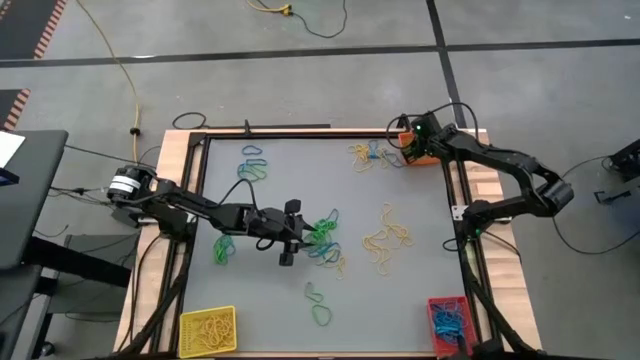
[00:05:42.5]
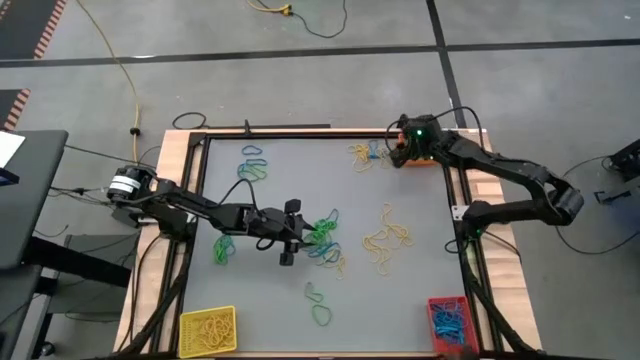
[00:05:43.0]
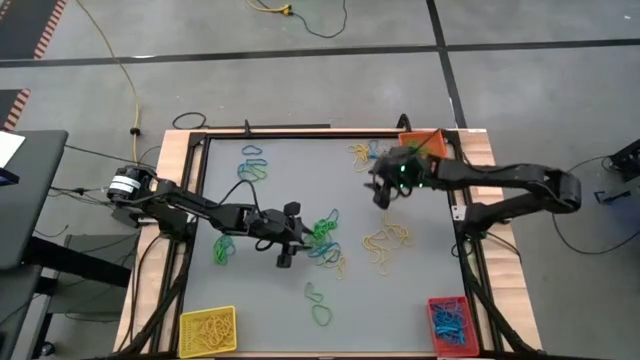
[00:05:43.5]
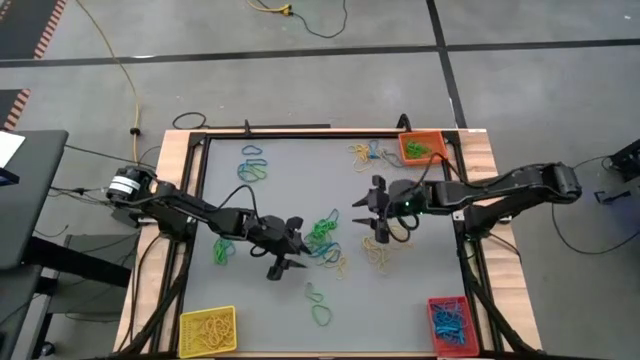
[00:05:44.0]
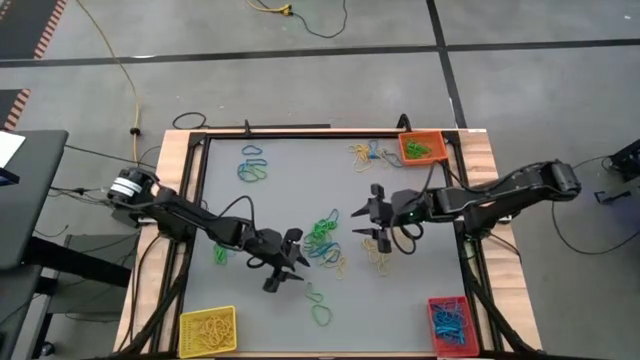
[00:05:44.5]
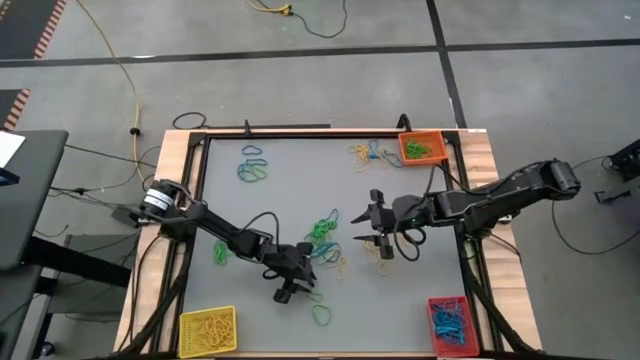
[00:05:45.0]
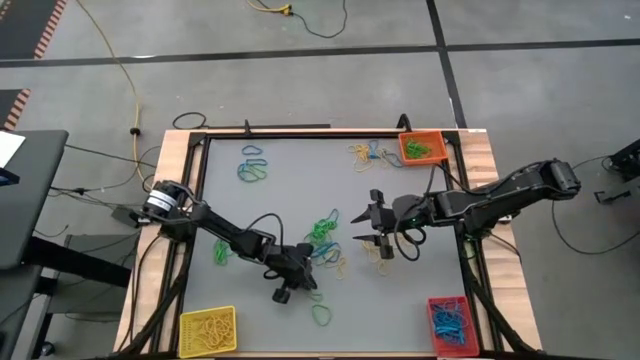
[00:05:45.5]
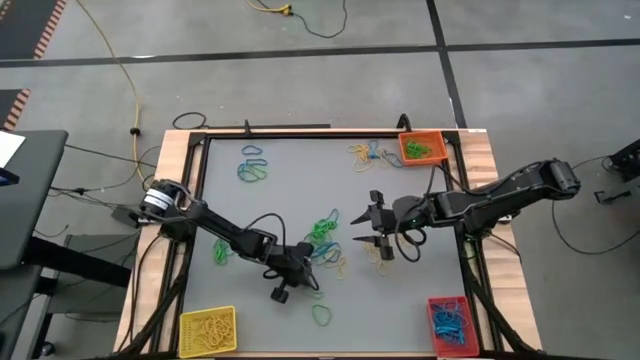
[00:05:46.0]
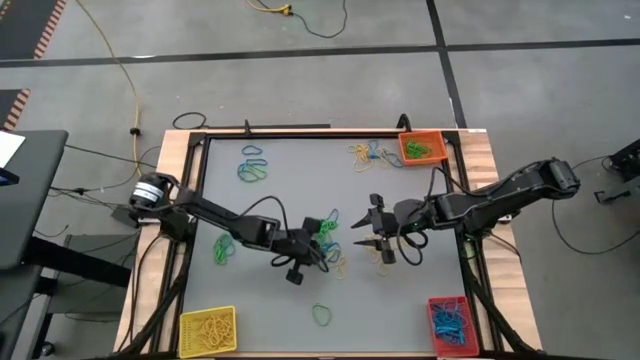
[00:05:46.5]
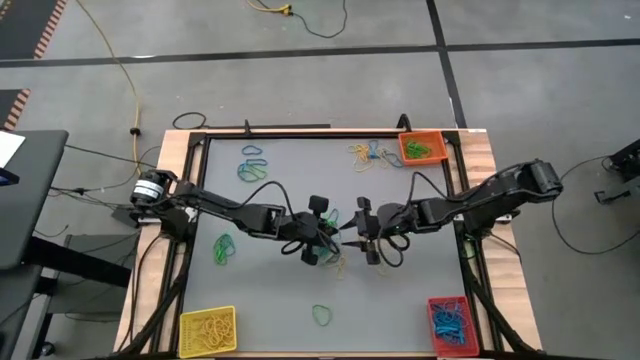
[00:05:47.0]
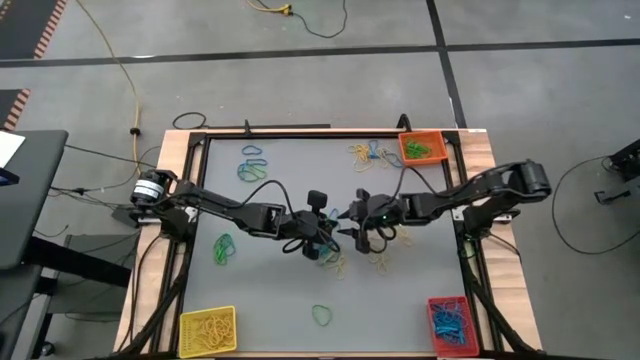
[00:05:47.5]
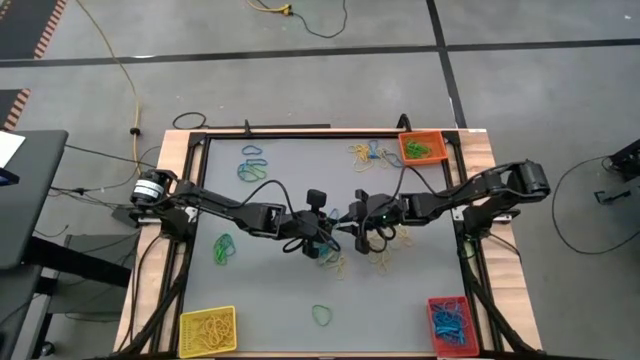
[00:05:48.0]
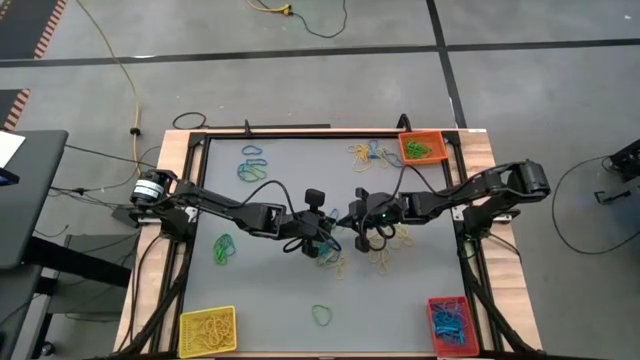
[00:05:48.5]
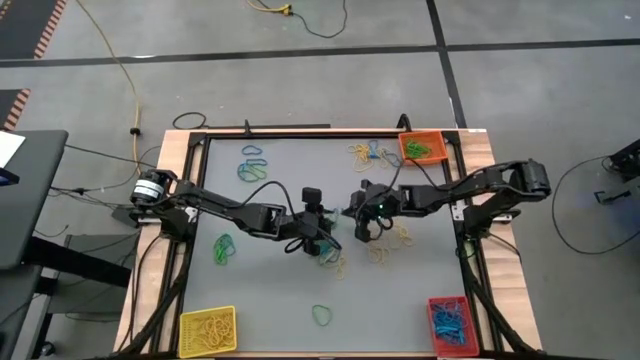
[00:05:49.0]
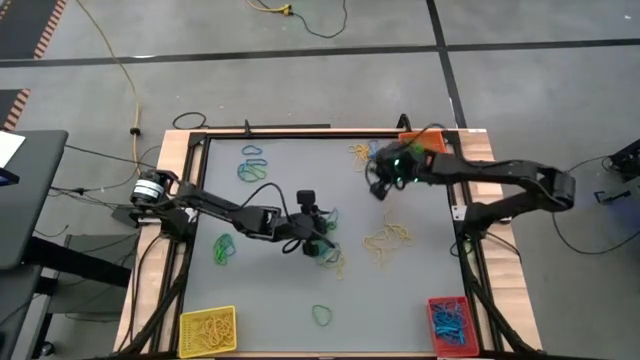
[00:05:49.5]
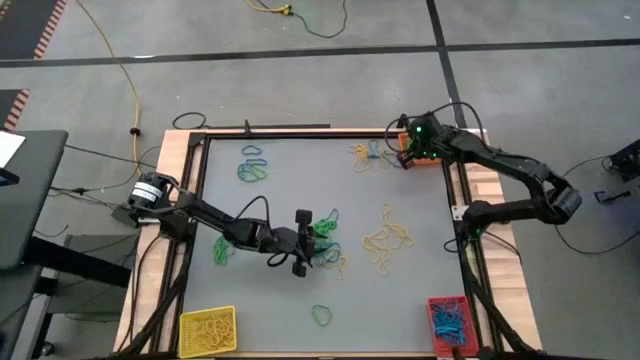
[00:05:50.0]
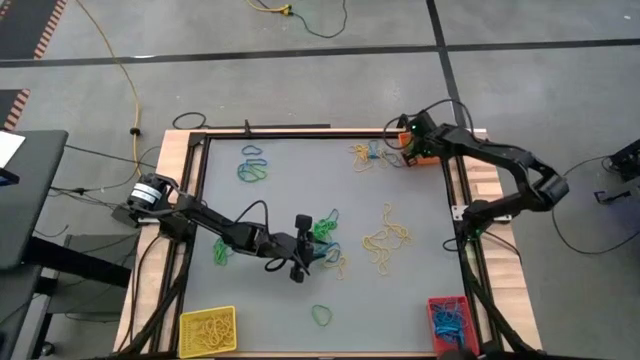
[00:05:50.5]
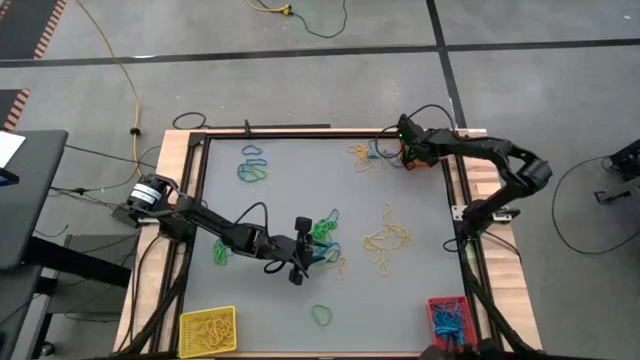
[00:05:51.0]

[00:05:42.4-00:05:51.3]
Task: Sort rubber bands into baskets
Put the green rubber band into the orange bin

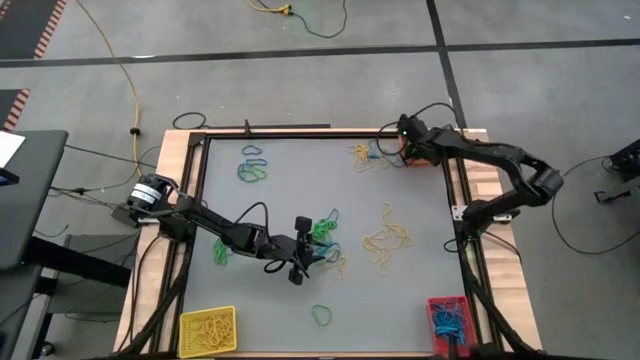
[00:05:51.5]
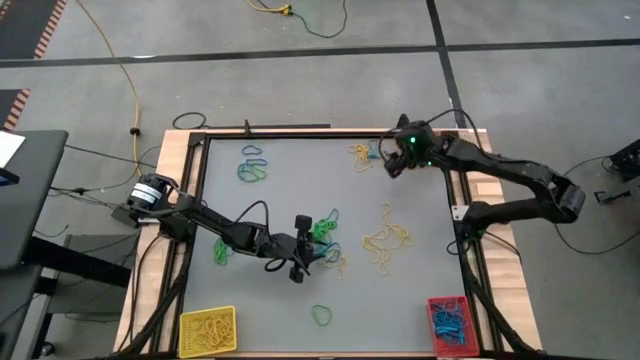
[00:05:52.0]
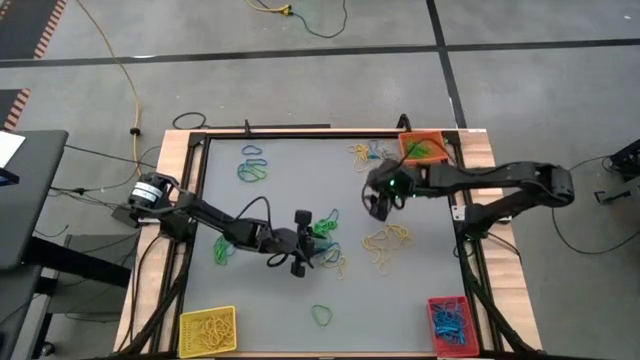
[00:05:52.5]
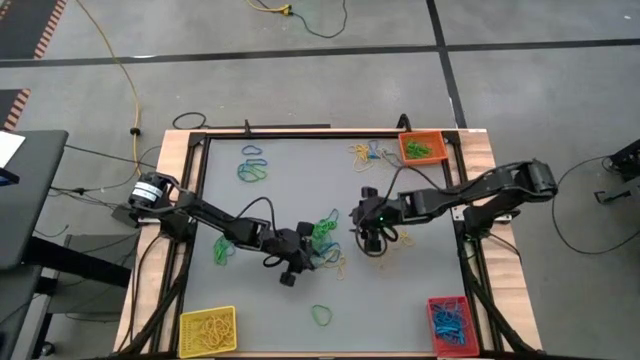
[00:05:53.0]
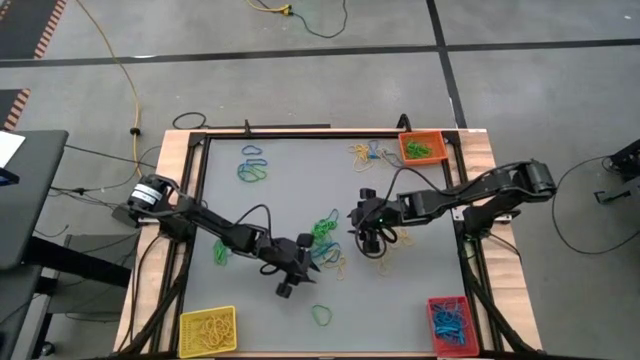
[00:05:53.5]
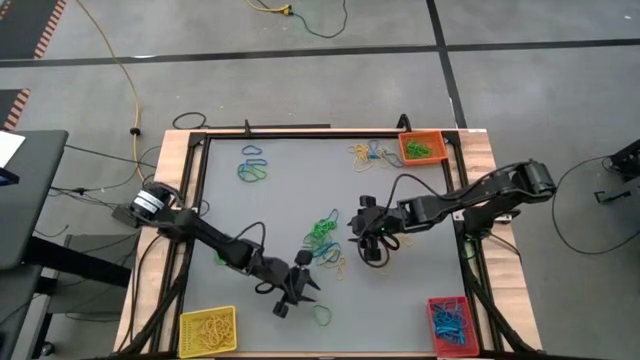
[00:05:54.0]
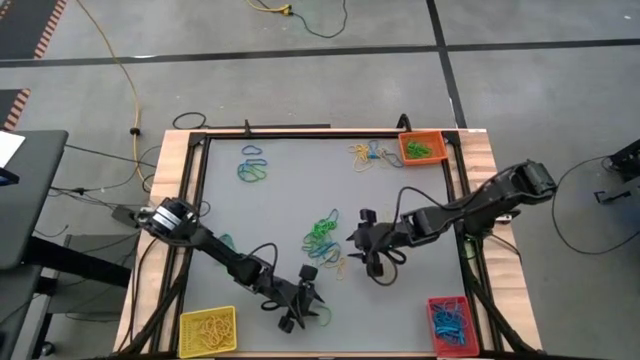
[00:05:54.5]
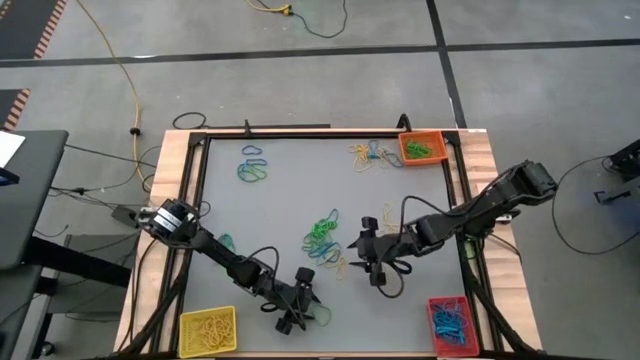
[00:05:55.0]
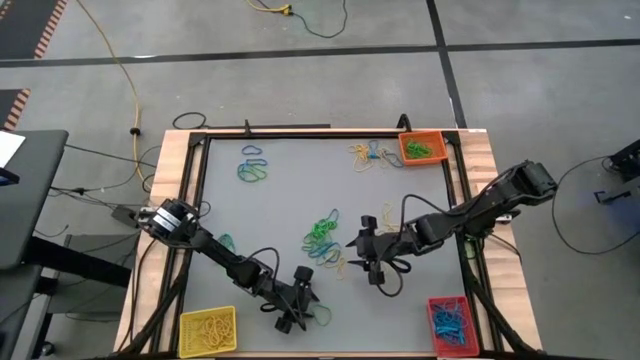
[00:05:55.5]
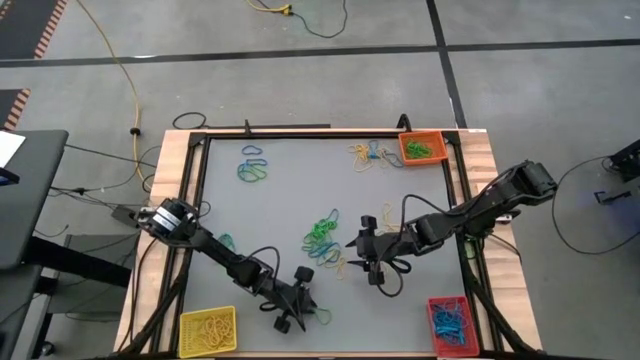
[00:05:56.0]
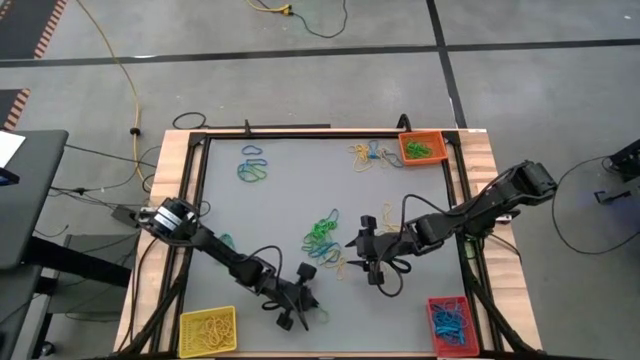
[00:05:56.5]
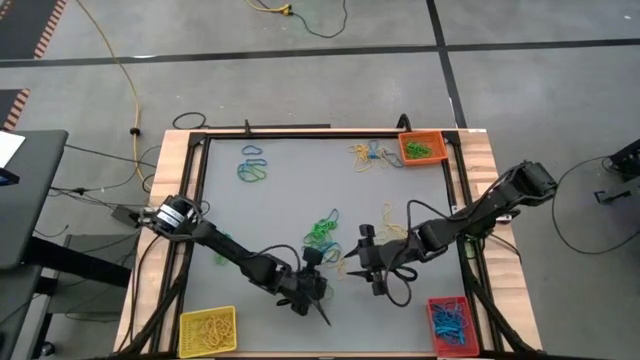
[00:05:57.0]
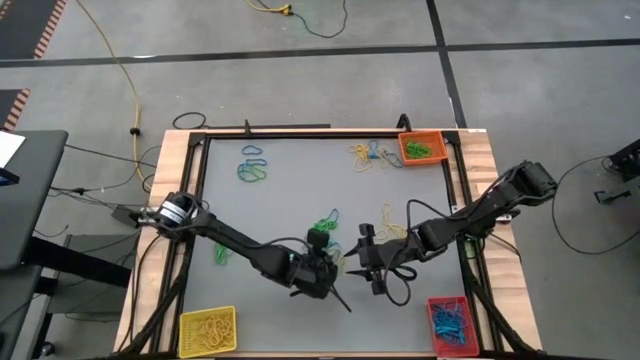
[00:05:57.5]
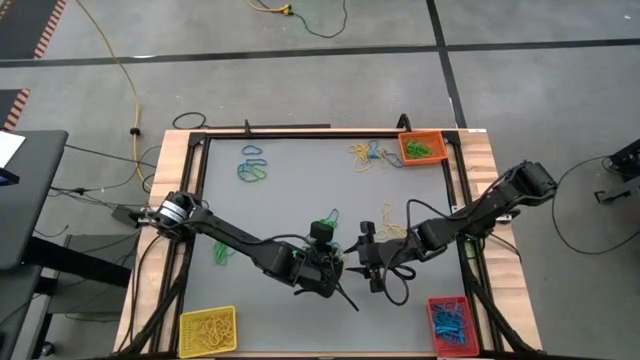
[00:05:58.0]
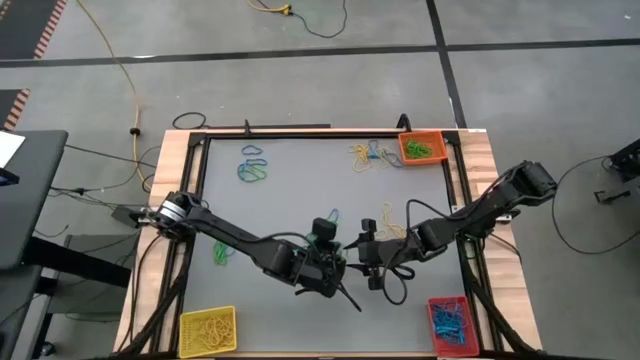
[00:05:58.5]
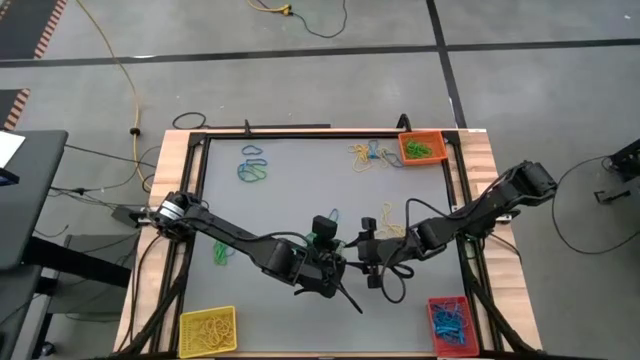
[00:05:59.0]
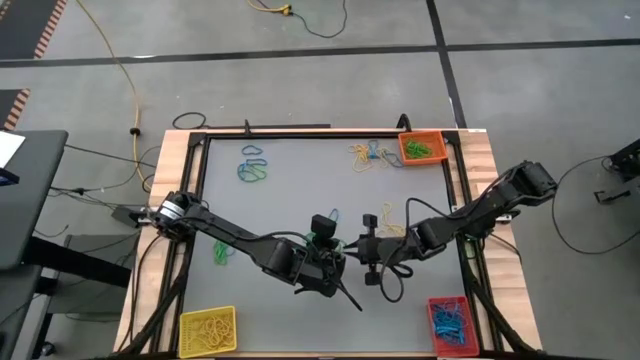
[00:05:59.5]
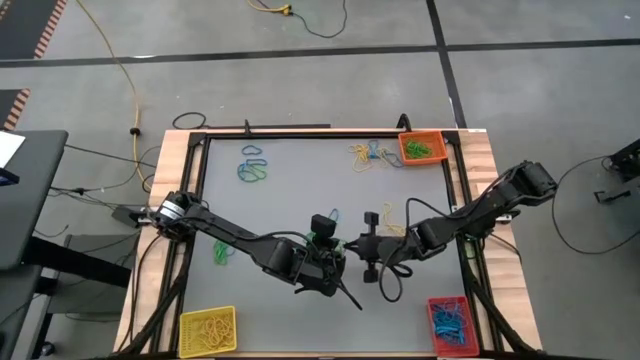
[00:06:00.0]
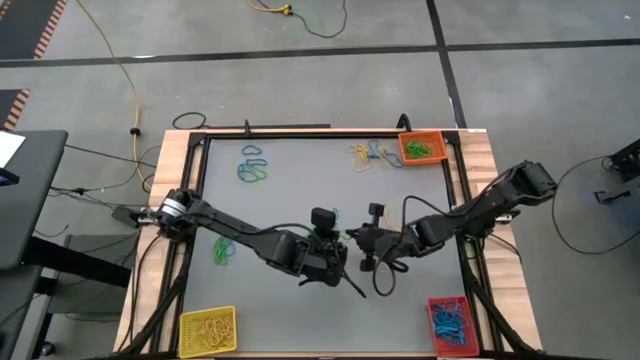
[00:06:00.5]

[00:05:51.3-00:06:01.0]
Put the green rubber band into the orange bin

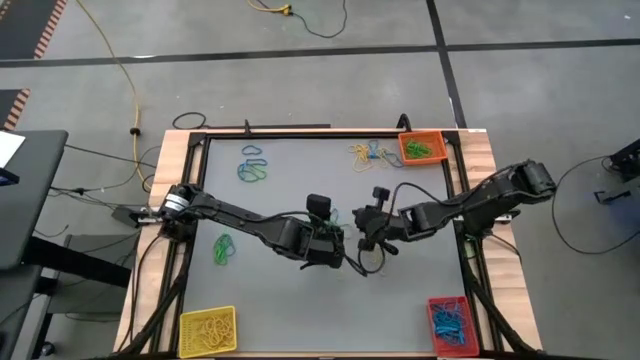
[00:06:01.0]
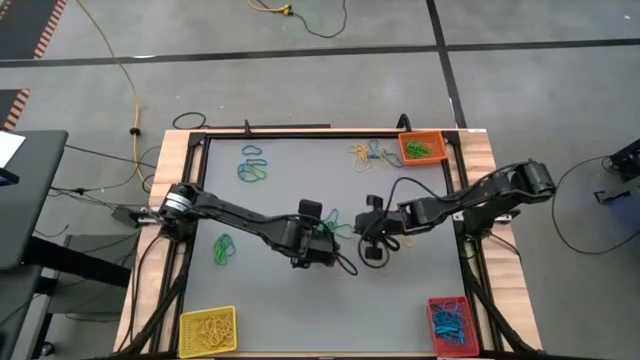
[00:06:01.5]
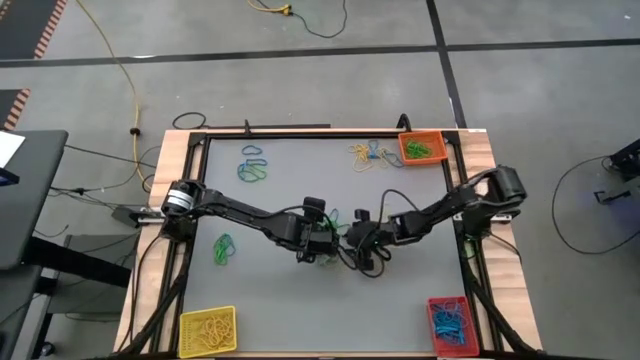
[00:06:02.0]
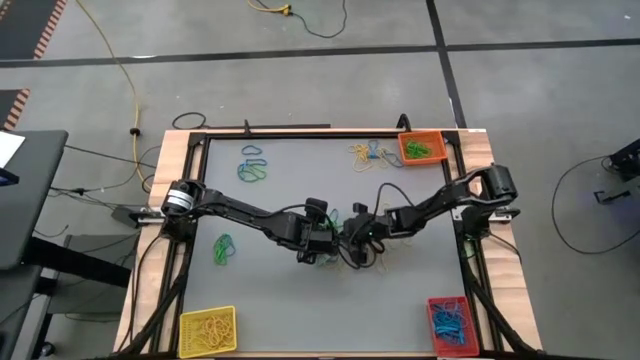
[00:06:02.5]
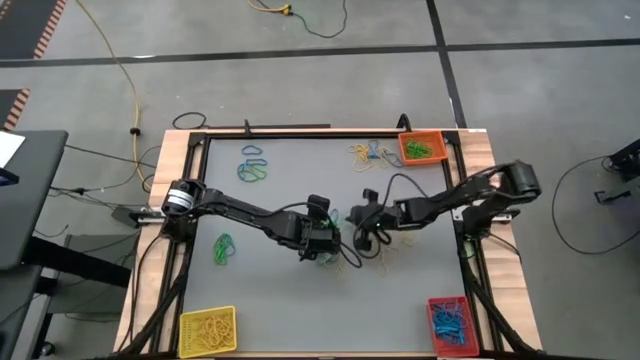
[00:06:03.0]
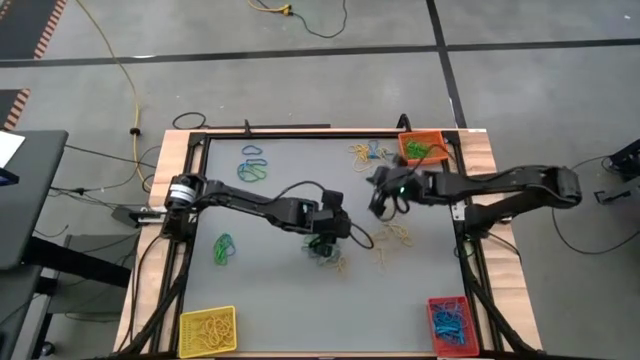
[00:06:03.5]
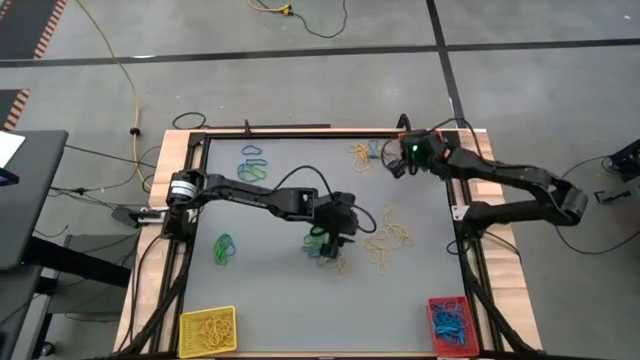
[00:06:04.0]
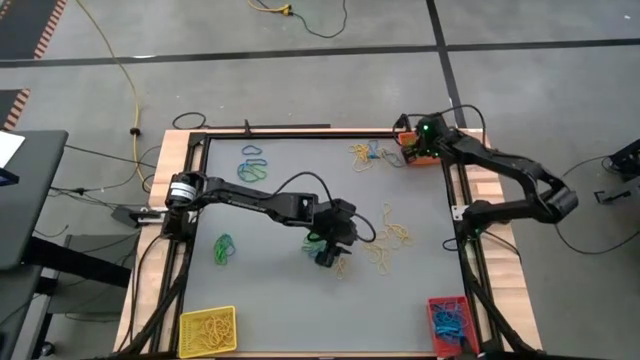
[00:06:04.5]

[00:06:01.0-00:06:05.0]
Put the green rubber band into the orange bin
